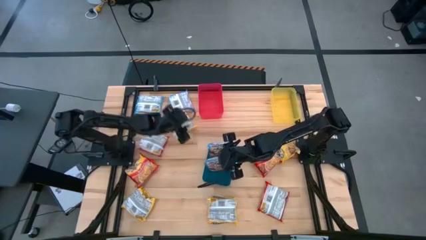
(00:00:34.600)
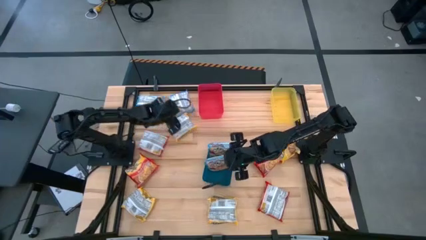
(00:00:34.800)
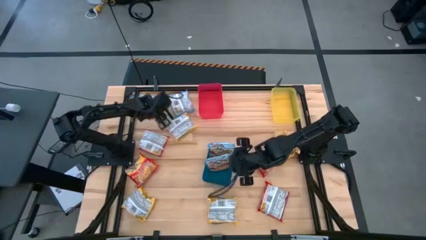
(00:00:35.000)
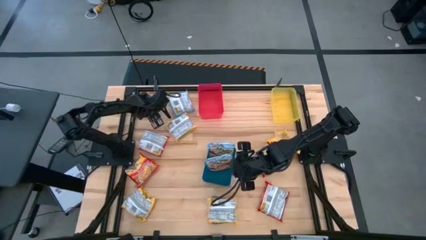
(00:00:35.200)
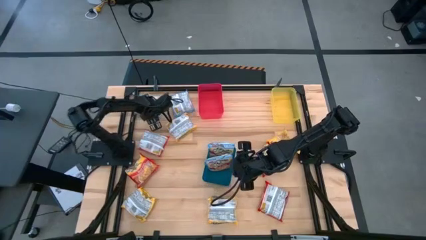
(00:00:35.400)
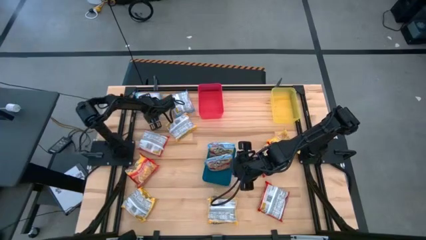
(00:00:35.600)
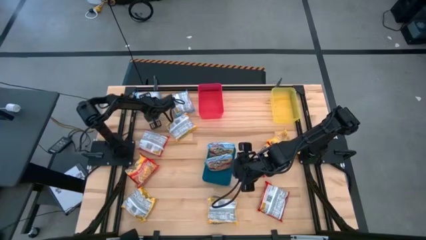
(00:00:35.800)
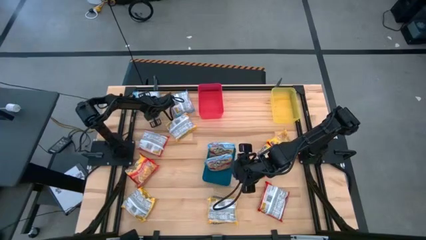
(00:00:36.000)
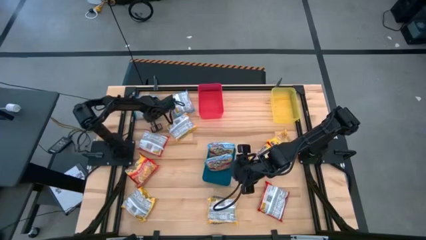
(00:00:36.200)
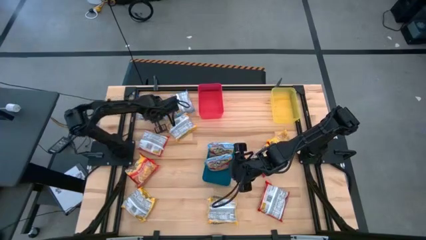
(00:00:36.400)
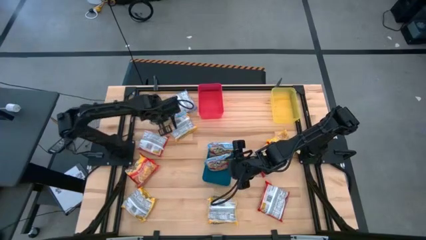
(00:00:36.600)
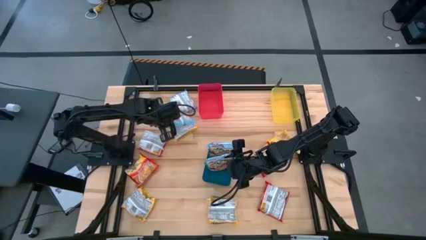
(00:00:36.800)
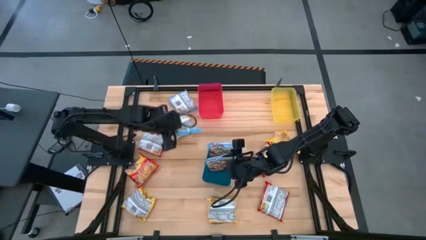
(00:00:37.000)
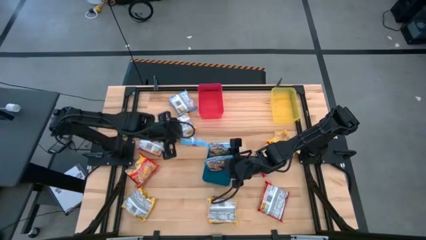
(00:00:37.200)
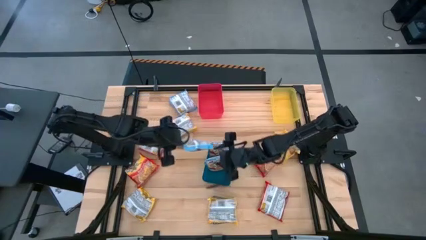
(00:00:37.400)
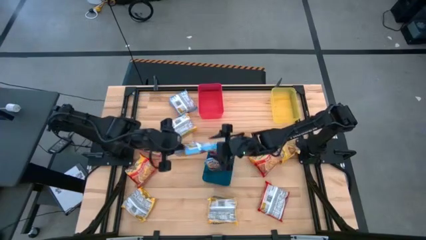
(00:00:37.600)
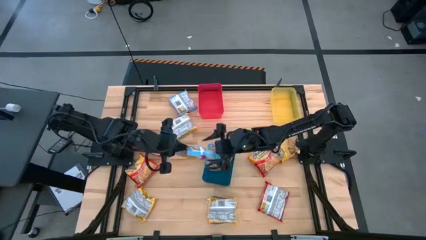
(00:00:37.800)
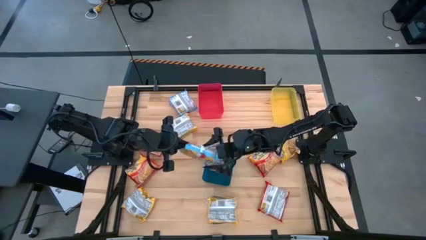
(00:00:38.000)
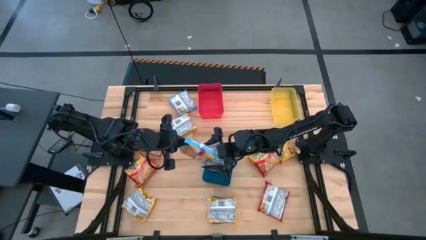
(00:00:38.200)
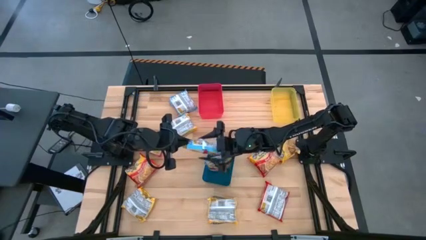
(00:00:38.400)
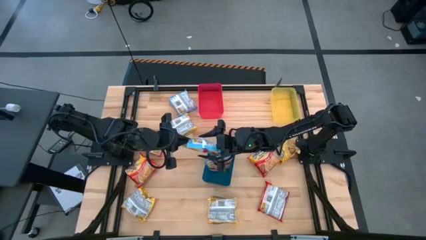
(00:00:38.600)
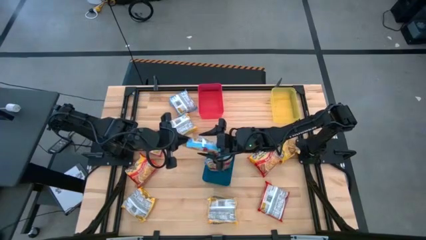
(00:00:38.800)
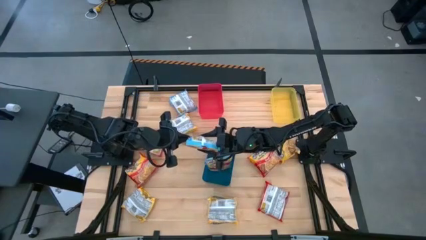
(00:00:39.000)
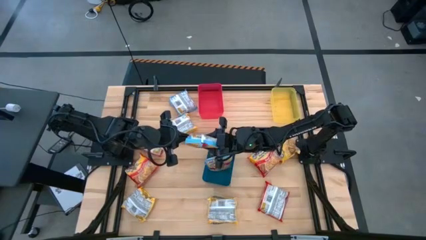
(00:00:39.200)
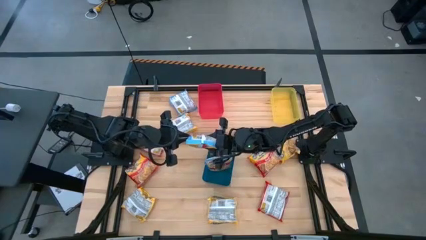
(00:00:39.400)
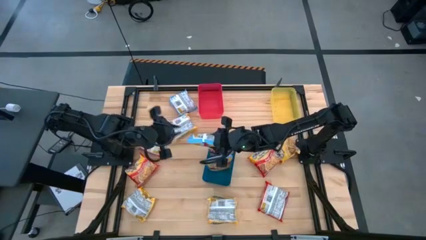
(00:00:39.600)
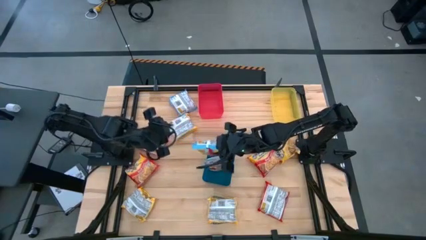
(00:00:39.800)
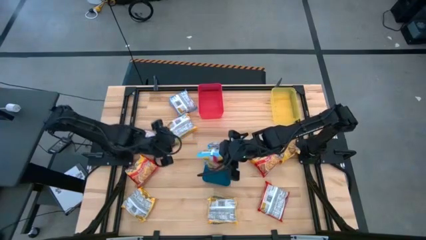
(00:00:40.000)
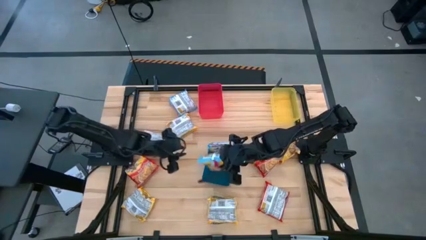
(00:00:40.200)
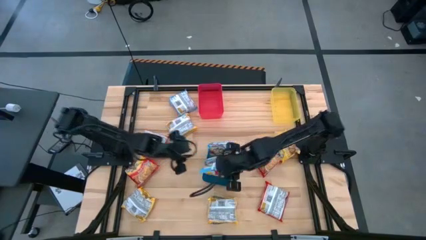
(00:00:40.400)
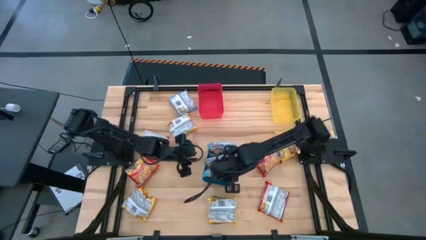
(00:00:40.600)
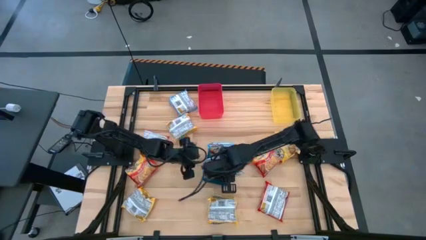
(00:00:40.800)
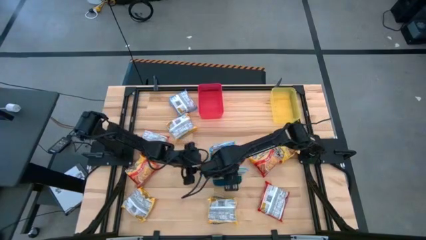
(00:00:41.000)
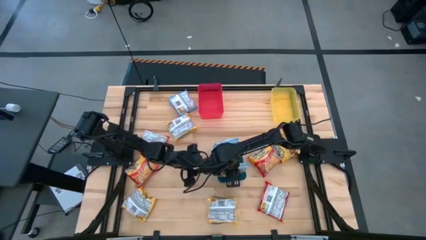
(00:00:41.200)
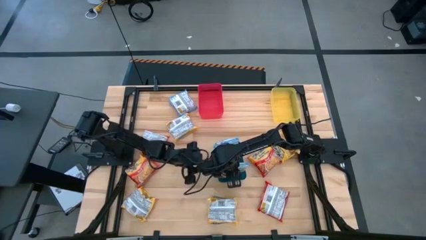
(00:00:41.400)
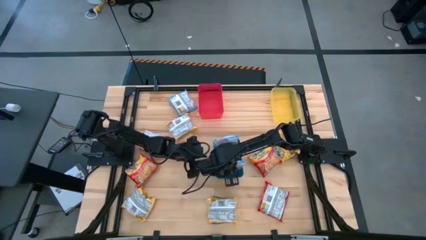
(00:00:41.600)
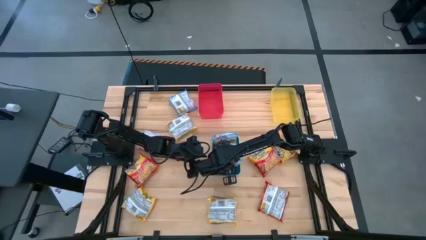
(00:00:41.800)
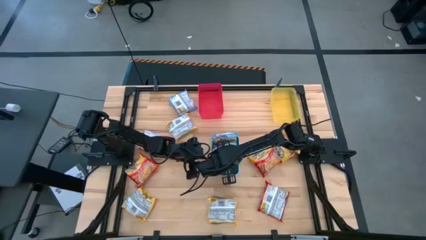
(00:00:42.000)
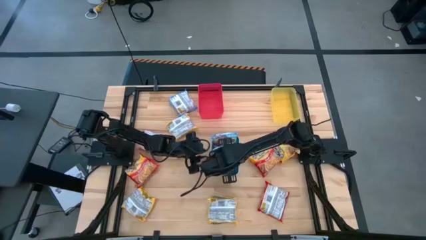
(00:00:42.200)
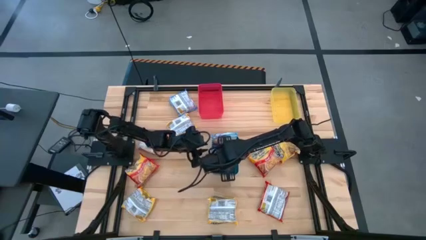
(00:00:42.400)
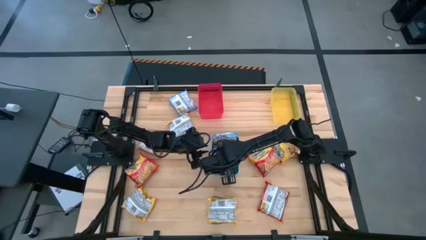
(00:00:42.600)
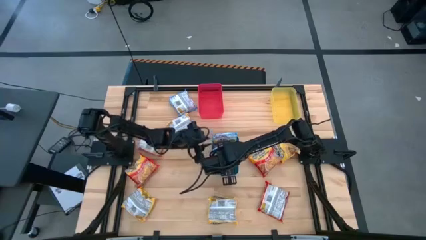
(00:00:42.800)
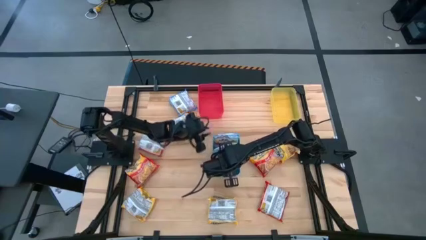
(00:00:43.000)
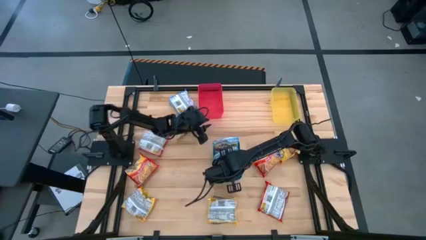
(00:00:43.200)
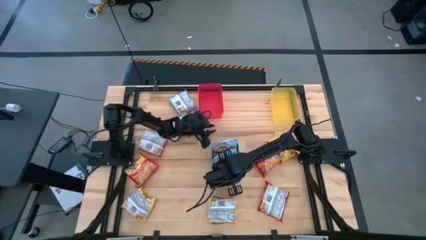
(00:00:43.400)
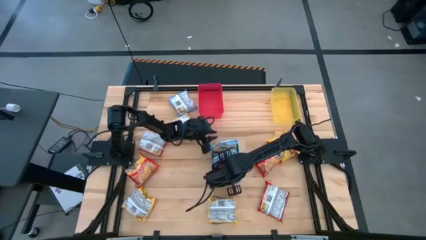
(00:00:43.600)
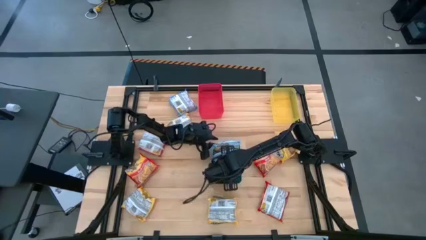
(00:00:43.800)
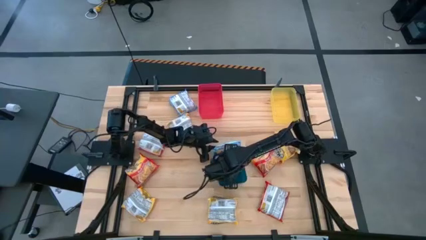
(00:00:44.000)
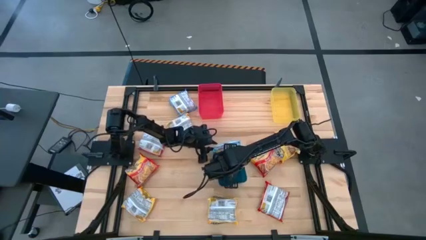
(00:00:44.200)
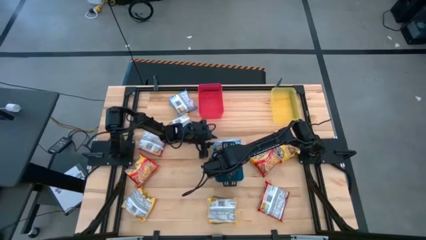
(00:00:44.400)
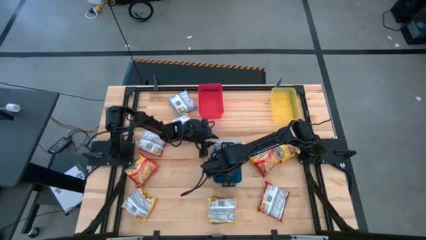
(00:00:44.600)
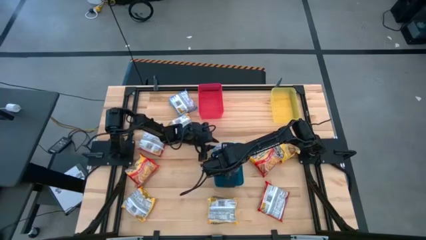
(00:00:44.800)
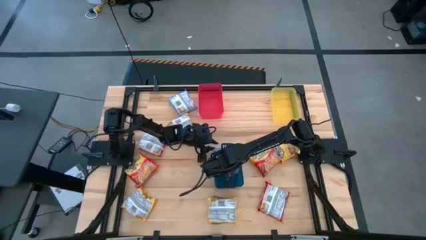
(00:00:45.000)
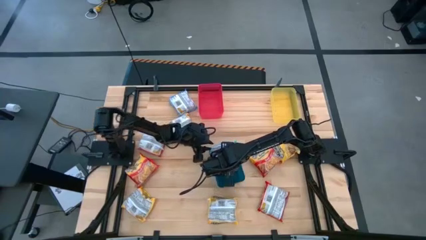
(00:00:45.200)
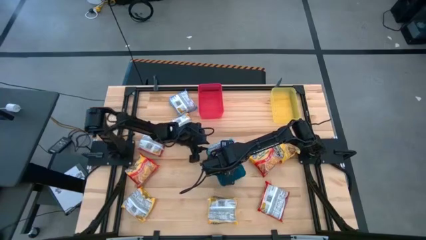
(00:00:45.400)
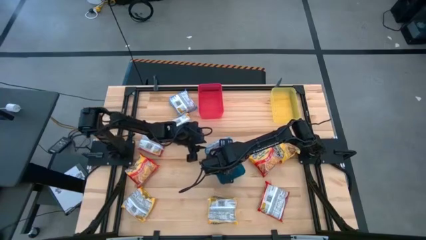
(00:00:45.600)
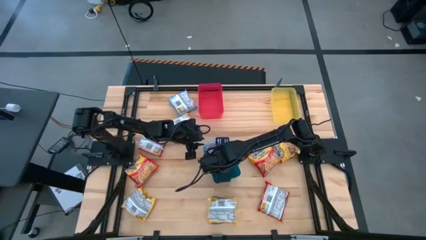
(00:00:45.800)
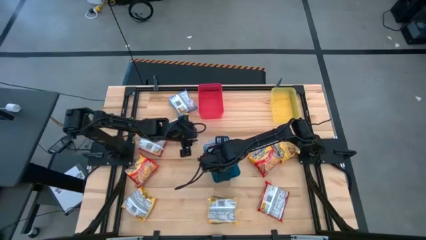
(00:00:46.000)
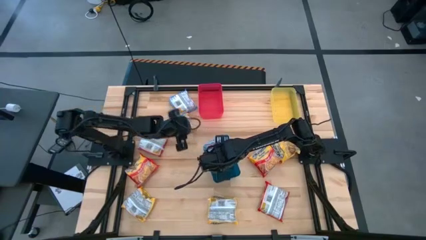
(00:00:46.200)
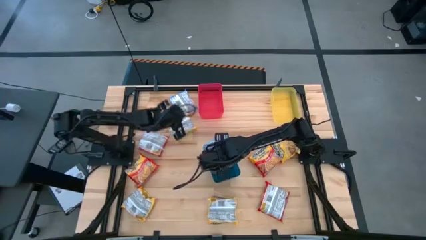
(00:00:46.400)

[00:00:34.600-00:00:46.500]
Task: Sort Maruchan noodles
Put the blue noodle pack into the blue bin

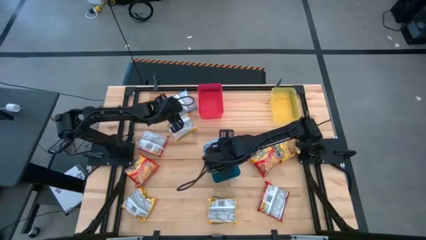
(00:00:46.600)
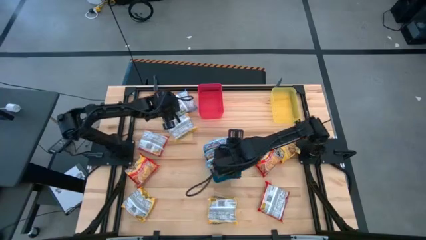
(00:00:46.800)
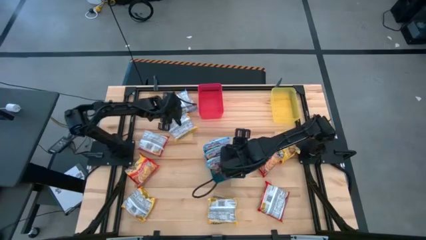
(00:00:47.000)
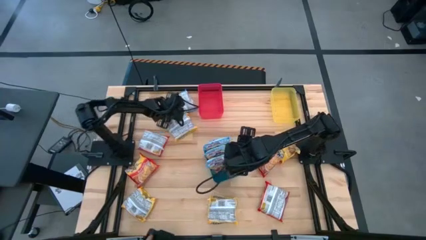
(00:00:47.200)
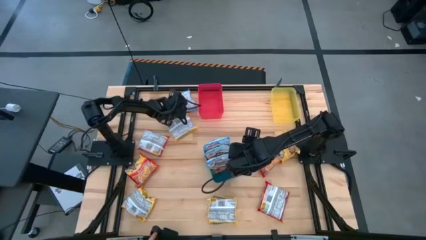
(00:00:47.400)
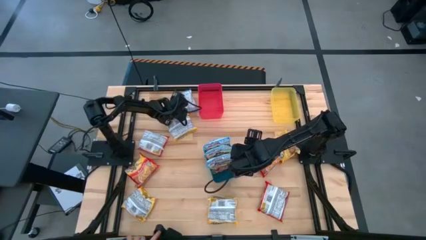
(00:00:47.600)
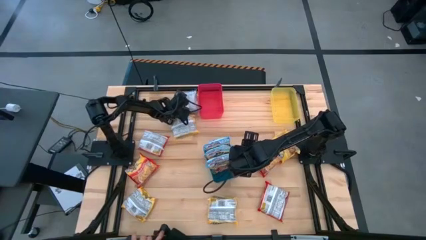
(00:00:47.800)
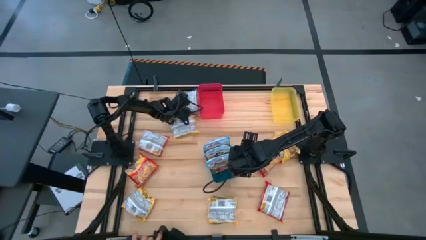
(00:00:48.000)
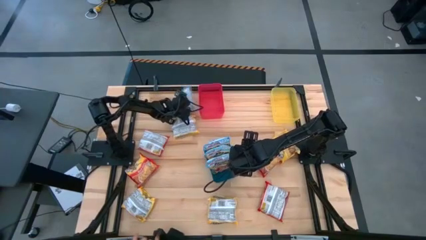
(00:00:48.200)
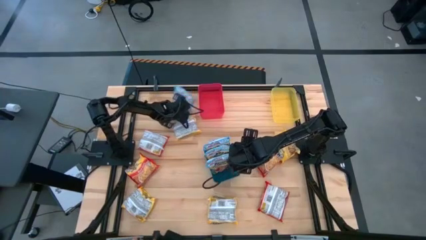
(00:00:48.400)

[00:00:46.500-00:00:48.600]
Put the blue noodle pack into the blue bin
